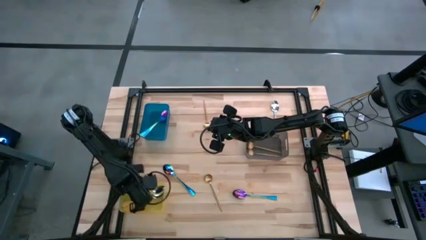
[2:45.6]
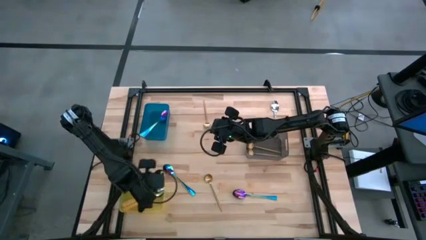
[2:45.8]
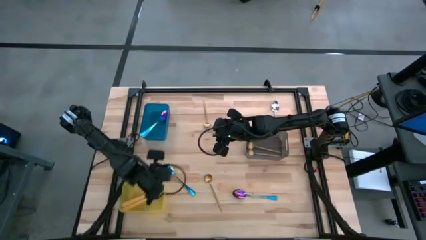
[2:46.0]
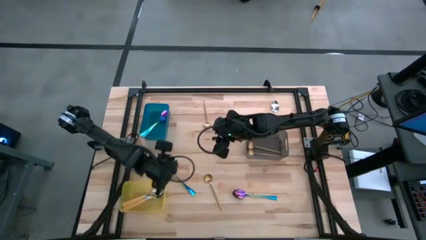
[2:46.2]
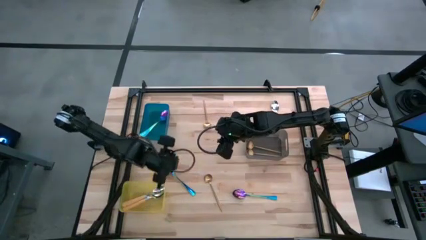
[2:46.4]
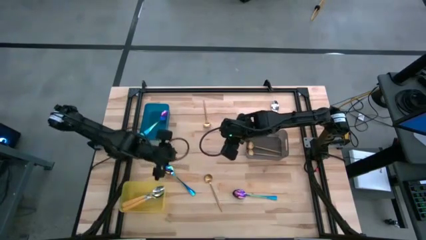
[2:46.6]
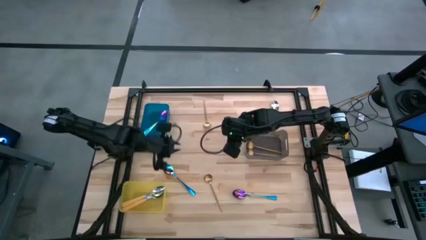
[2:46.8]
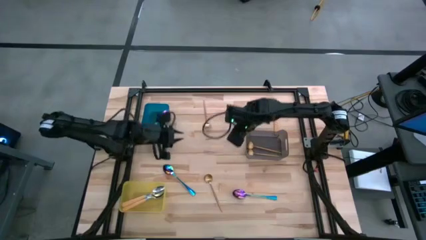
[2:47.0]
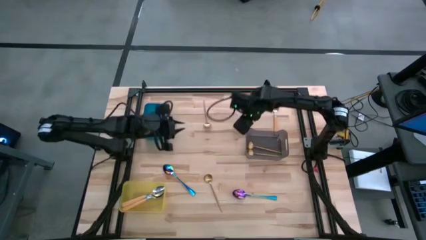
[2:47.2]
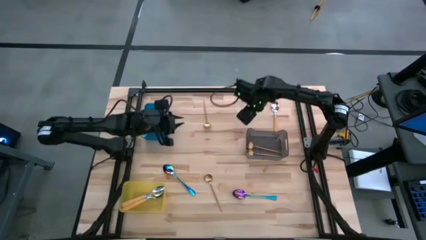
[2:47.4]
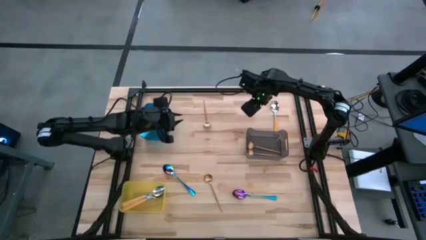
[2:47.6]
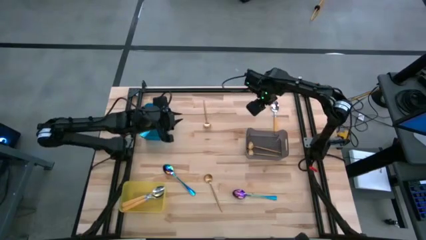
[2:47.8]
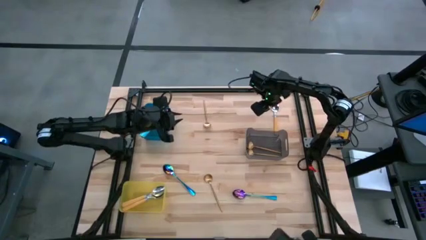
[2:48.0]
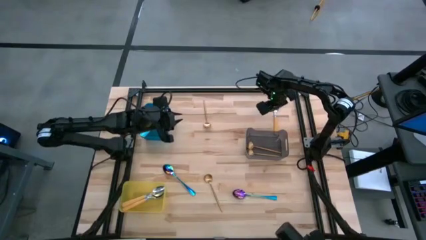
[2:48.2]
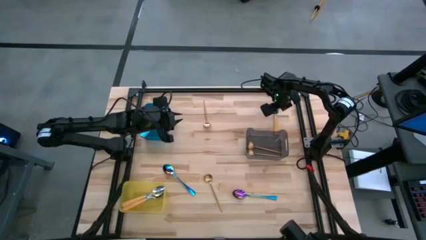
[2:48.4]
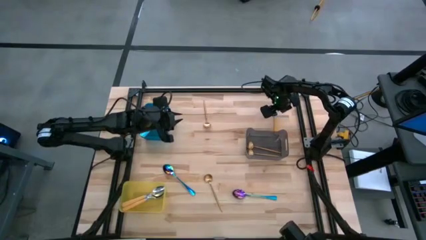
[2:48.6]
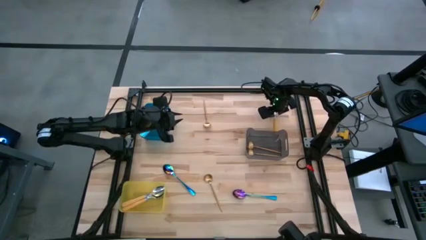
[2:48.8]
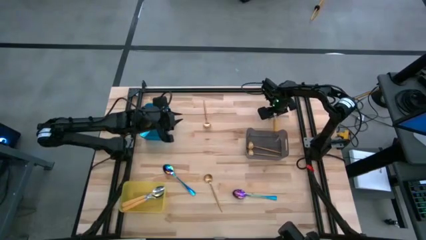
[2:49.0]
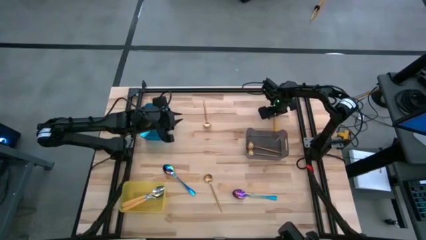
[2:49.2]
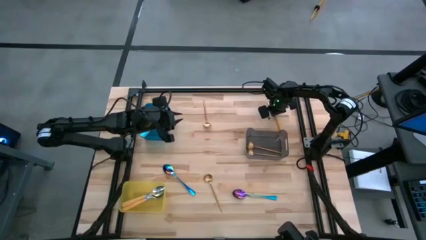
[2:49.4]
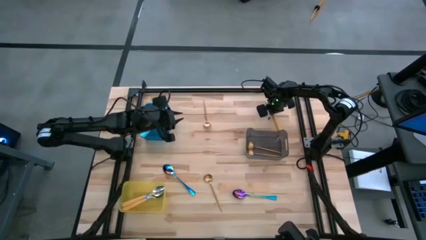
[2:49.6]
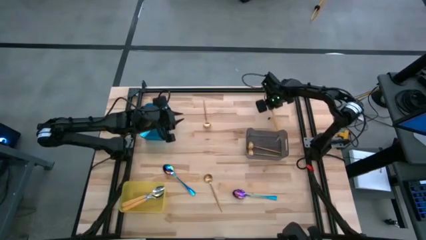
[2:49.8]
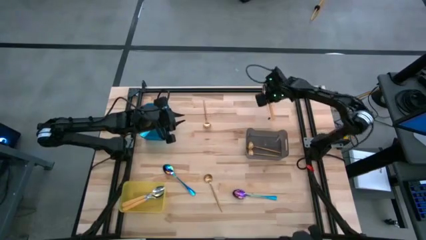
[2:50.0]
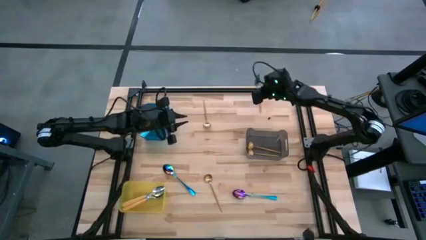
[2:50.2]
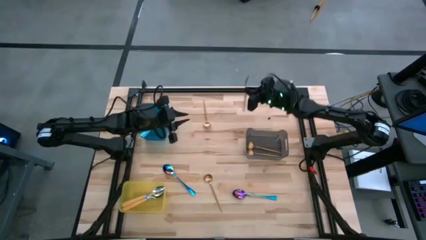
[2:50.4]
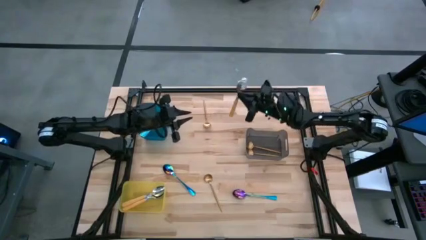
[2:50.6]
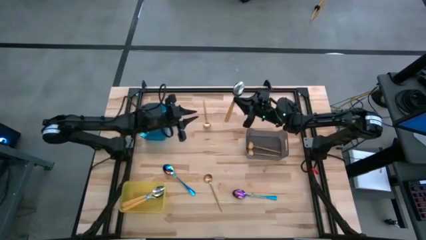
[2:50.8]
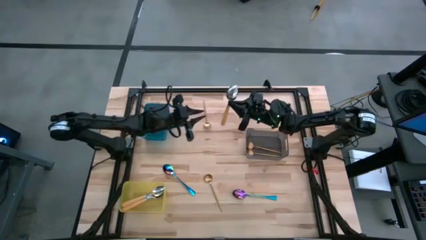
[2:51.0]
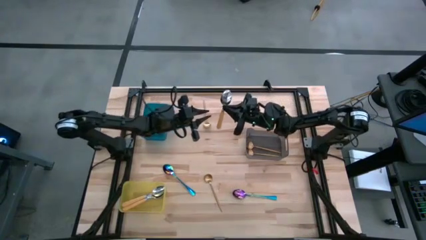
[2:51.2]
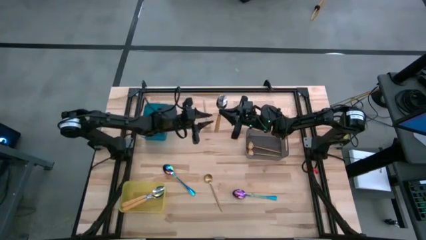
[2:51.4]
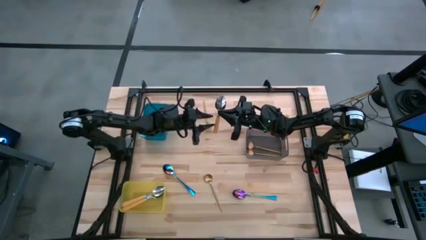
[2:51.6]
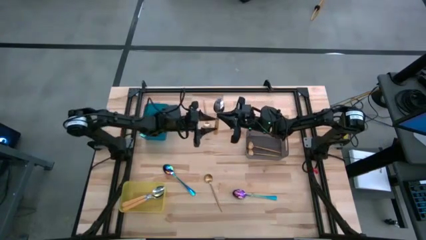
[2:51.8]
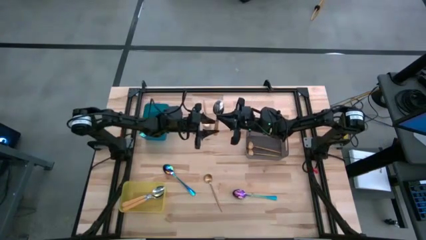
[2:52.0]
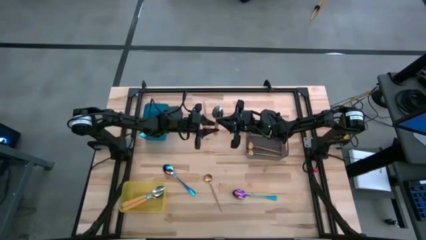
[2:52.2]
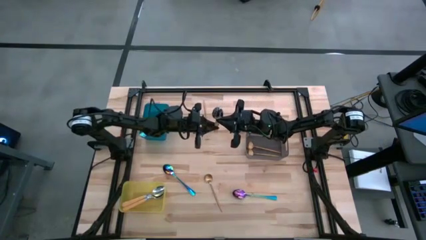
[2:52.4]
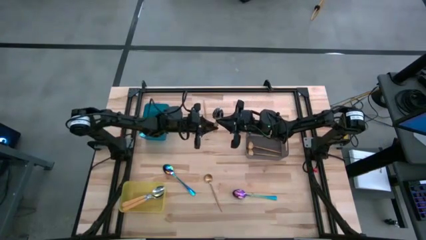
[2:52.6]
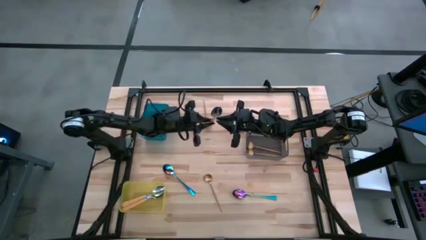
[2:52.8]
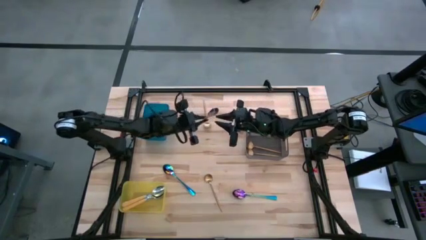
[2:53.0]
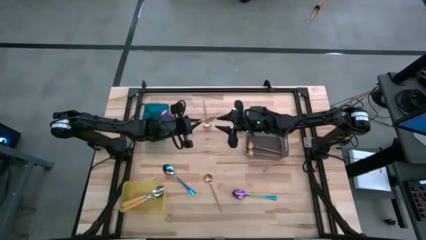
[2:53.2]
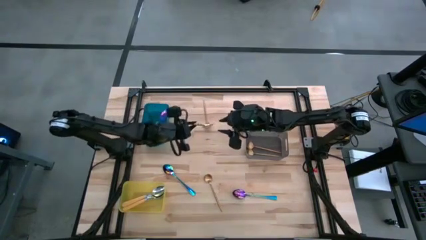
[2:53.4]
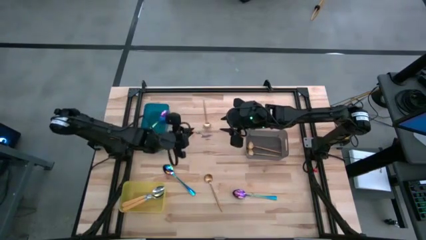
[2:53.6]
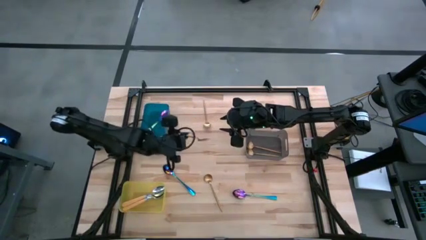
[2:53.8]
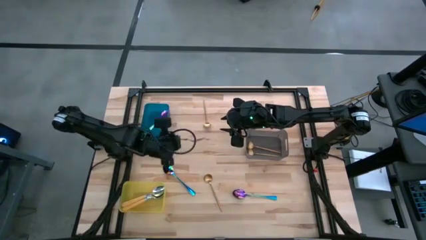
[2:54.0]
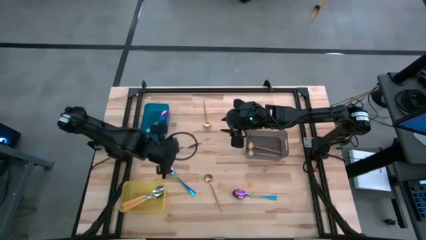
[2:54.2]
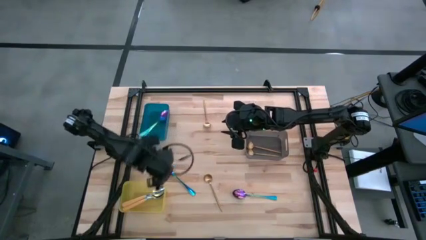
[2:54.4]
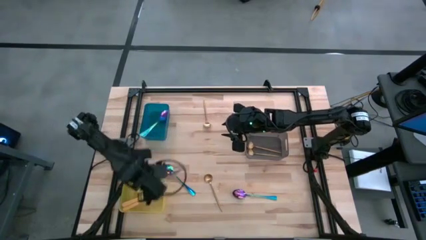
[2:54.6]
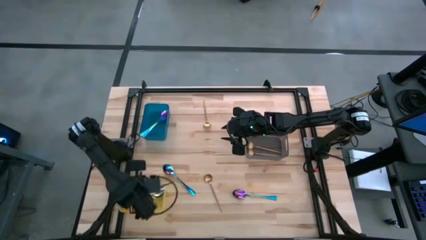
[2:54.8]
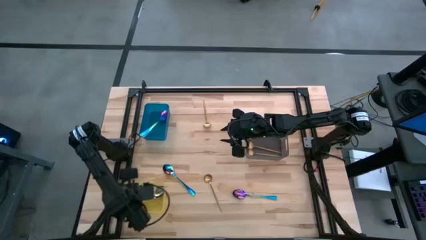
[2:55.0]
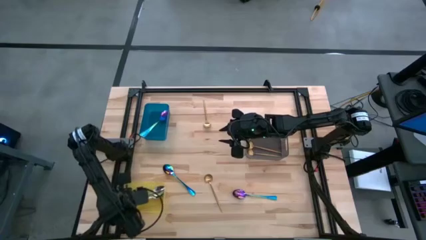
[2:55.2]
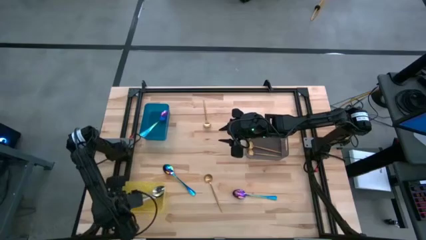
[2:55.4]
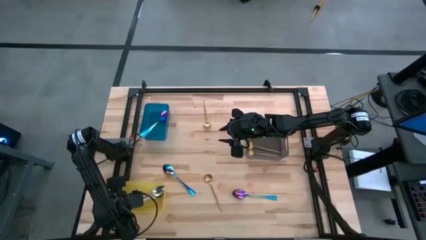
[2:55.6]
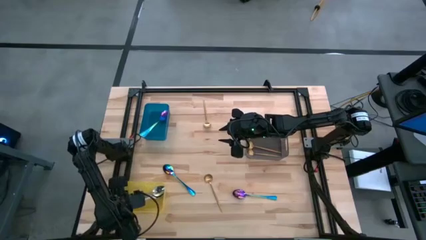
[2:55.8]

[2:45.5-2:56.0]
Task: Sort silverware by color (type)
Put the yellow spoon into the yellow bin

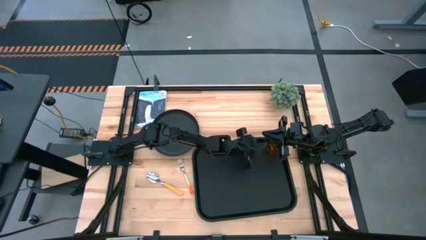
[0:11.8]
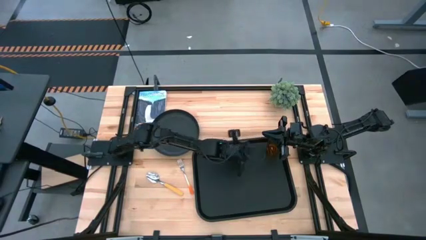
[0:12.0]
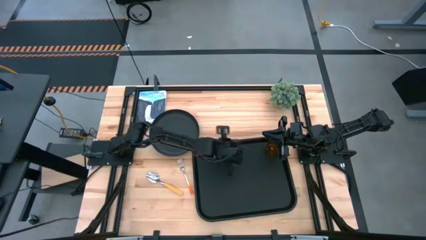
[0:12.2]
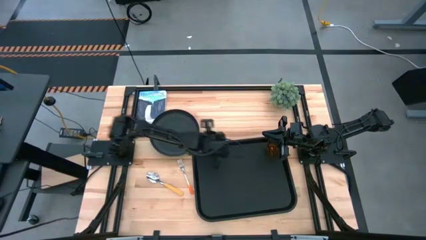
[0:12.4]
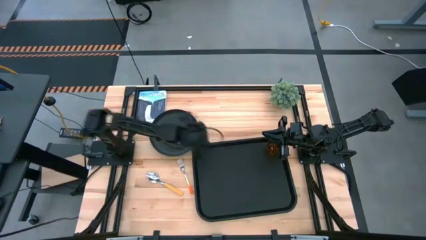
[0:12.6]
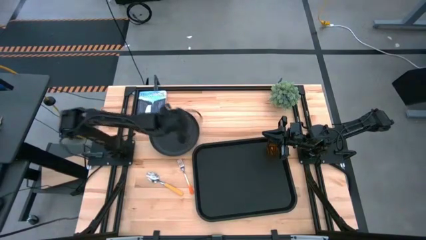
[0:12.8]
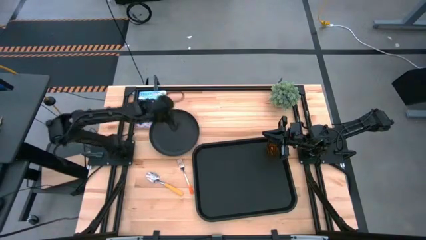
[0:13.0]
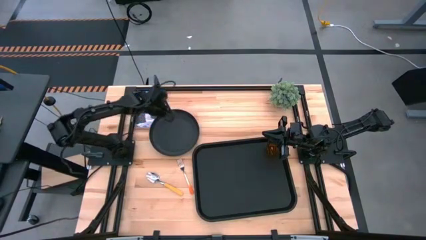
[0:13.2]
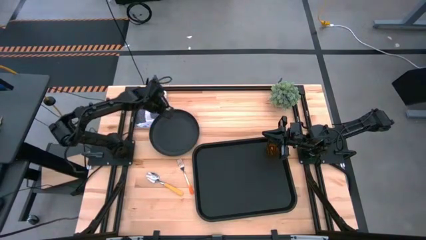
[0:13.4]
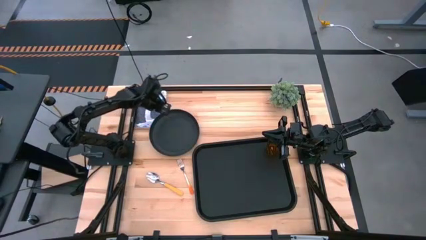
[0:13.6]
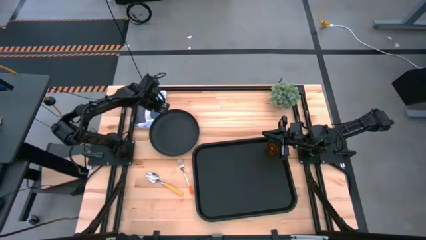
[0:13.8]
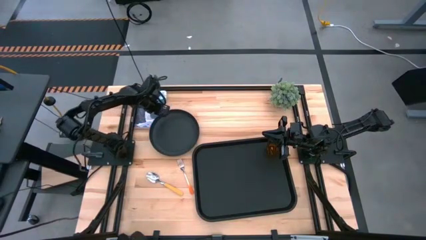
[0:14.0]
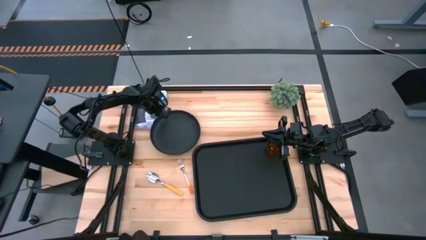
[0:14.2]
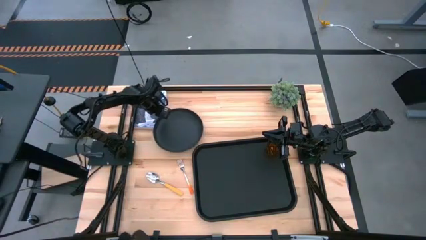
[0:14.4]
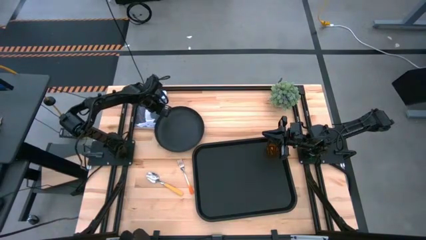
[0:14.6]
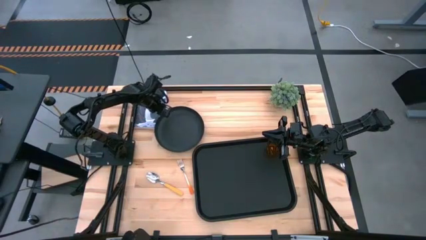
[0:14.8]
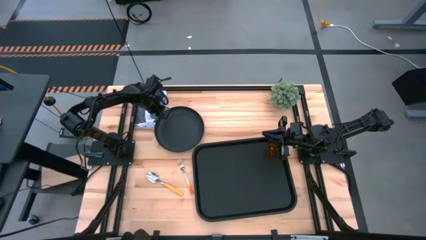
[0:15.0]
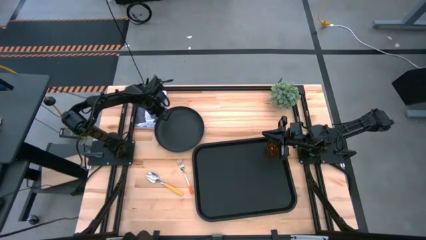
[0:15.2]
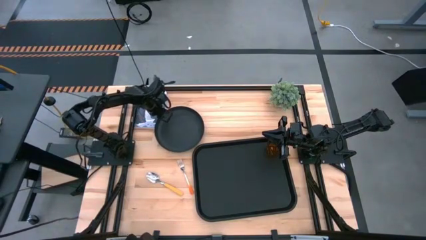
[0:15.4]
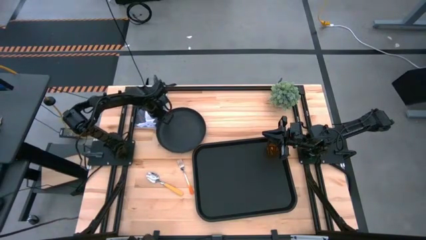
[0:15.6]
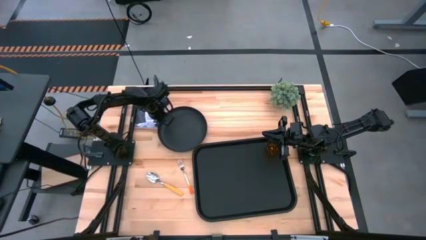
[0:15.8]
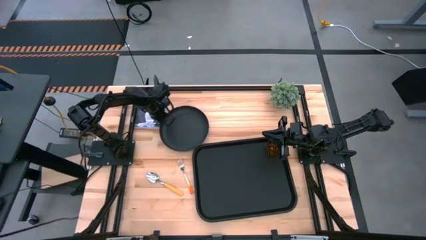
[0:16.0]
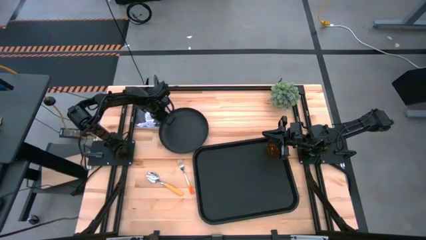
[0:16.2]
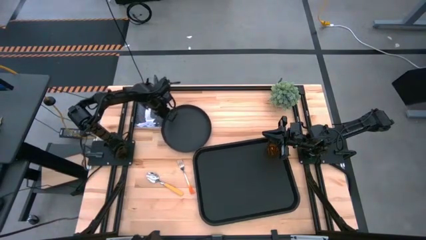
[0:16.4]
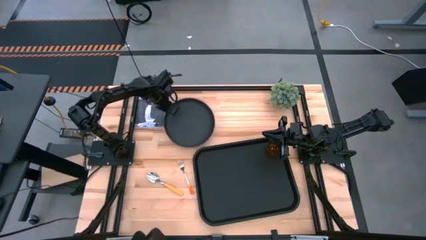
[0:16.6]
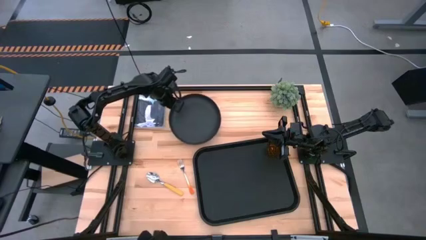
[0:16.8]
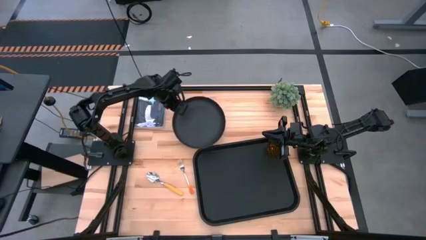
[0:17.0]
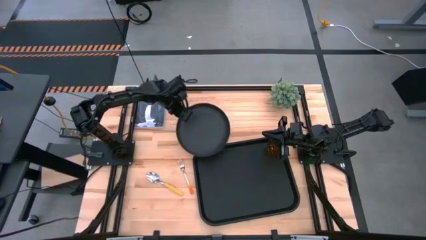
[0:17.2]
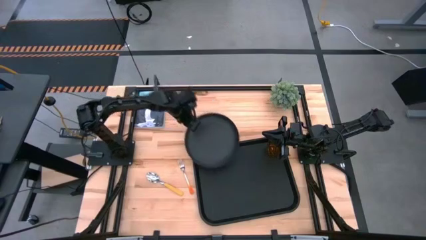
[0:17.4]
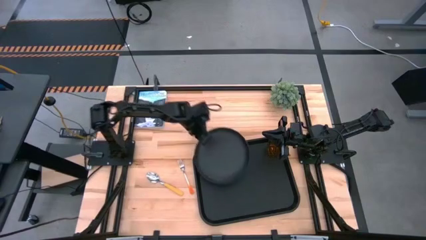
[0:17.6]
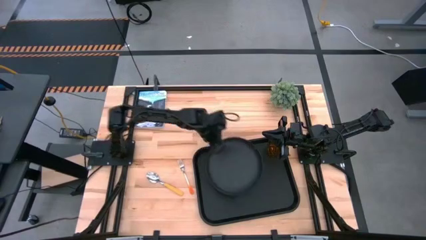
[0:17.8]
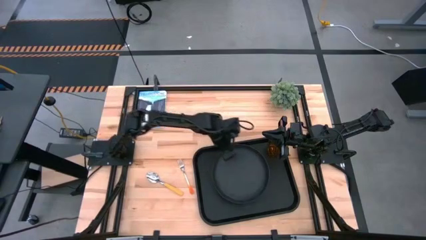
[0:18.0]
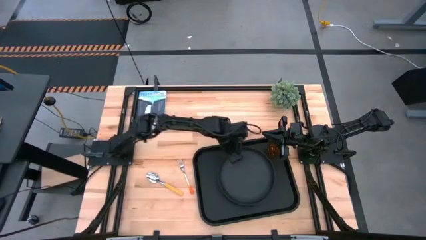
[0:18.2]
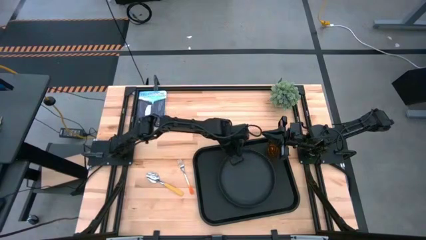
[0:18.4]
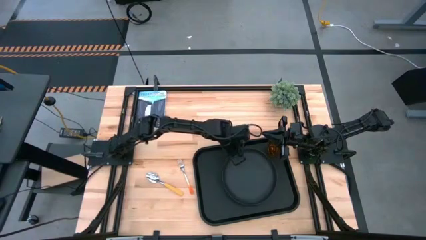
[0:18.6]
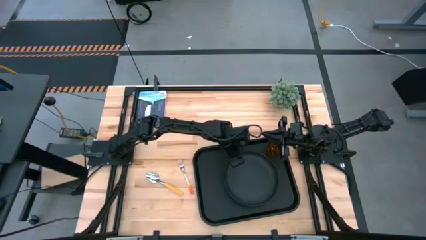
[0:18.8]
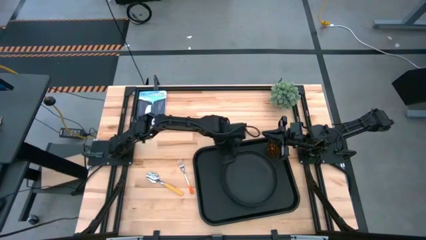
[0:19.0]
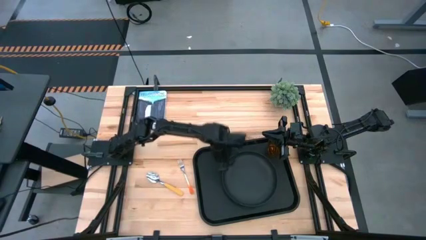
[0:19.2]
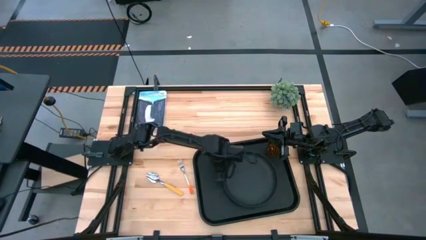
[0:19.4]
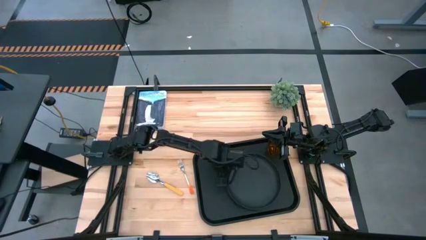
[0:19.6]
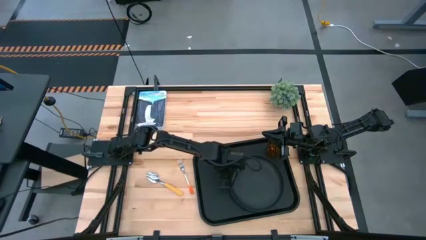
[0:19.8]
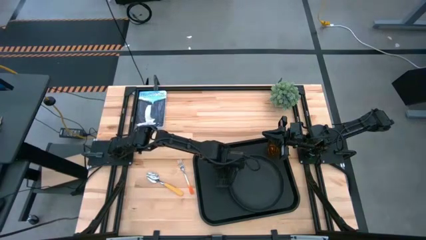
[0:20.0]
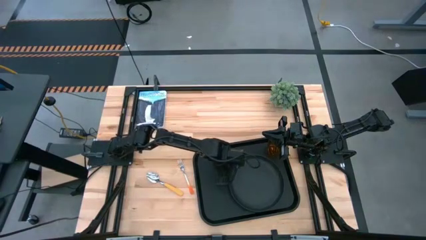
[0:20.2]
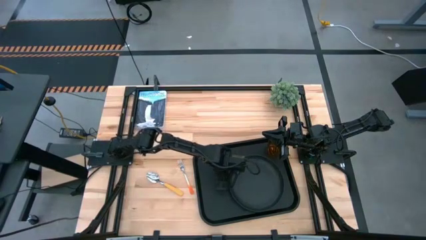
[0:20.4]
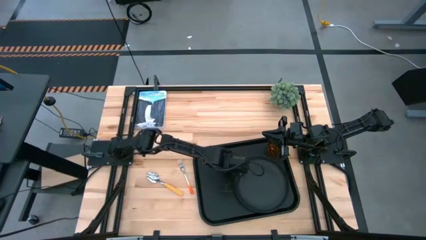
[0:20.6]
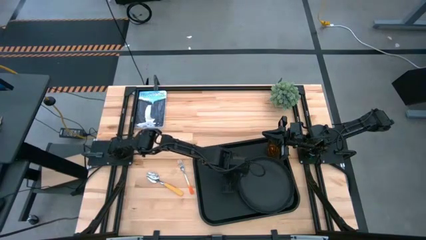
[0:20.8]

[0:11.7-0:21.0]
Task: Pick and place plate/cup/fork/spoon on tray
Put the black plate to the bottom left of the brown cup on the black serving tray
